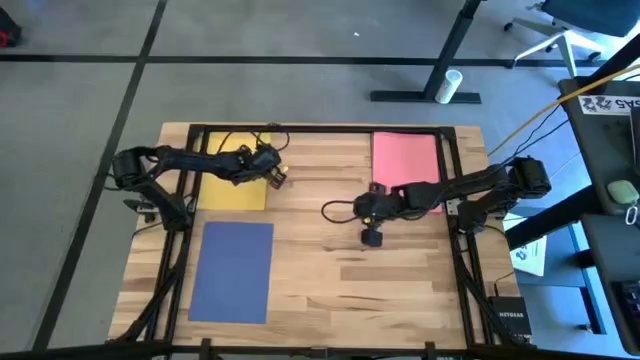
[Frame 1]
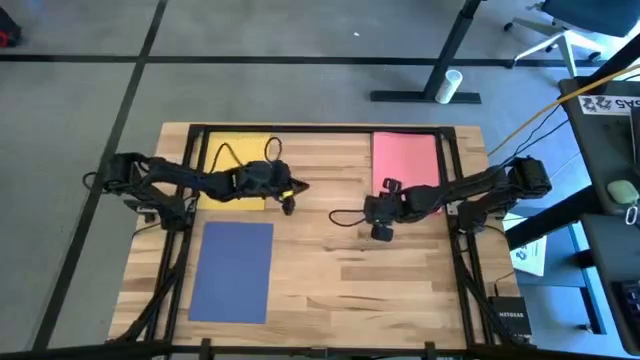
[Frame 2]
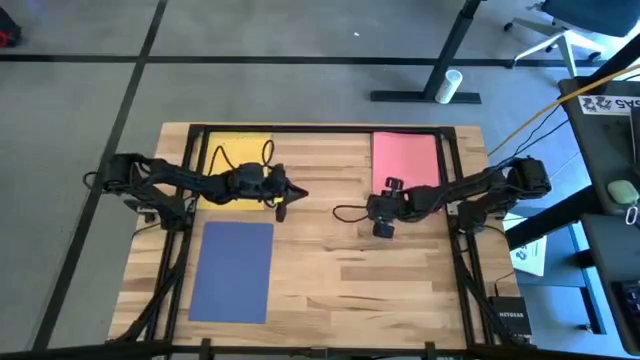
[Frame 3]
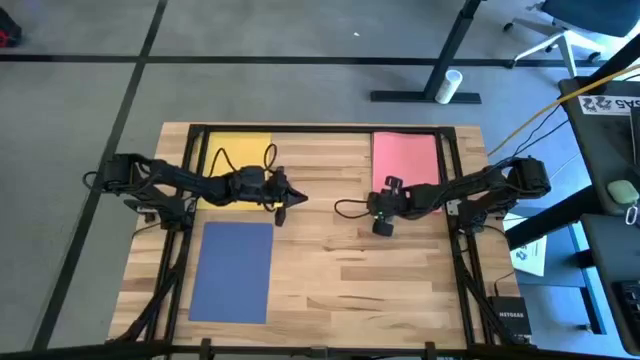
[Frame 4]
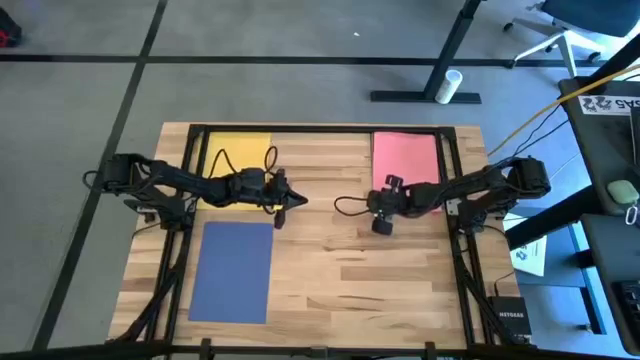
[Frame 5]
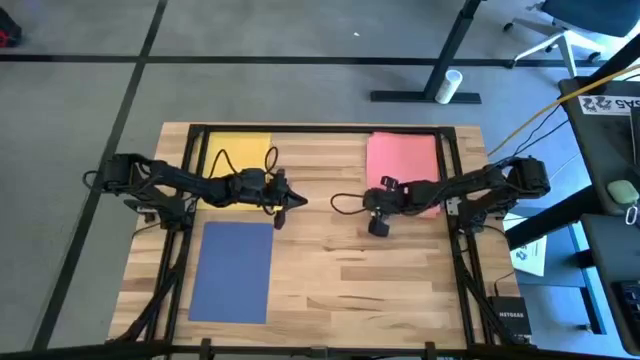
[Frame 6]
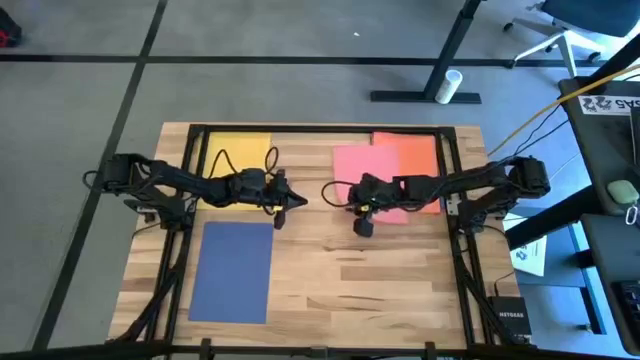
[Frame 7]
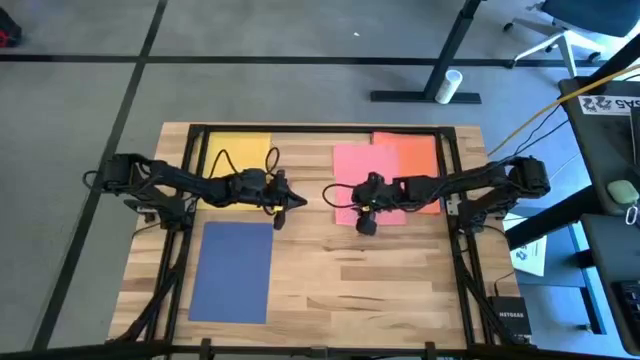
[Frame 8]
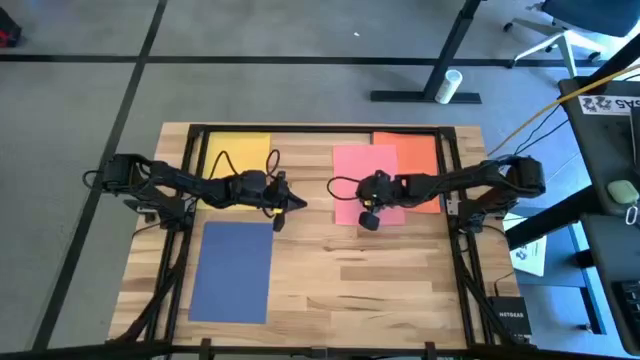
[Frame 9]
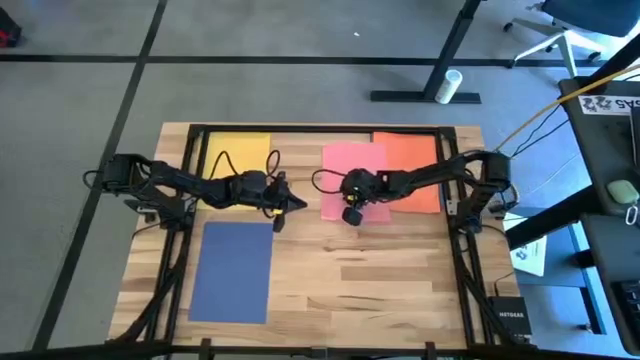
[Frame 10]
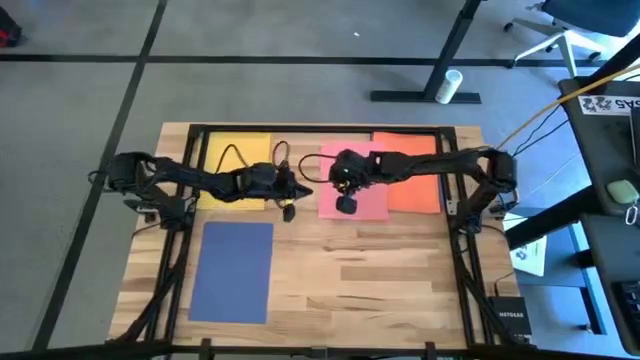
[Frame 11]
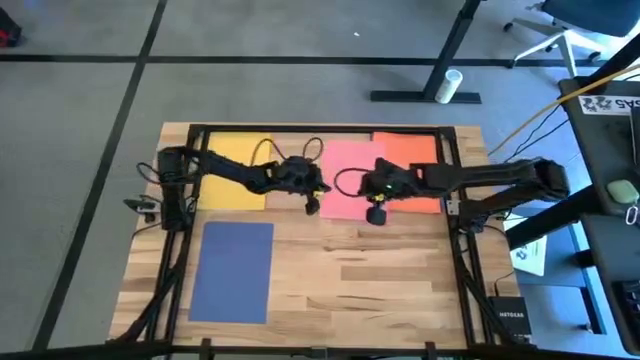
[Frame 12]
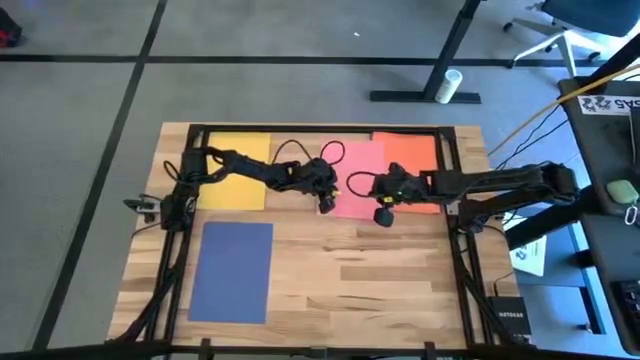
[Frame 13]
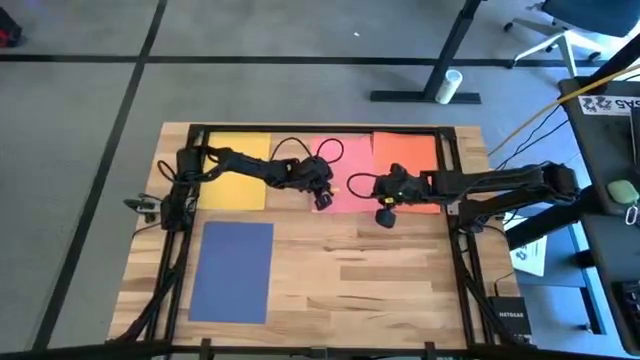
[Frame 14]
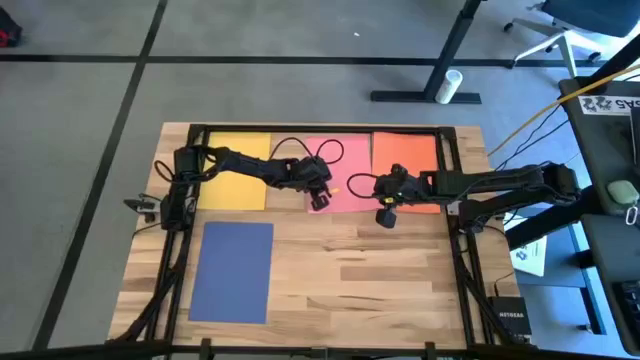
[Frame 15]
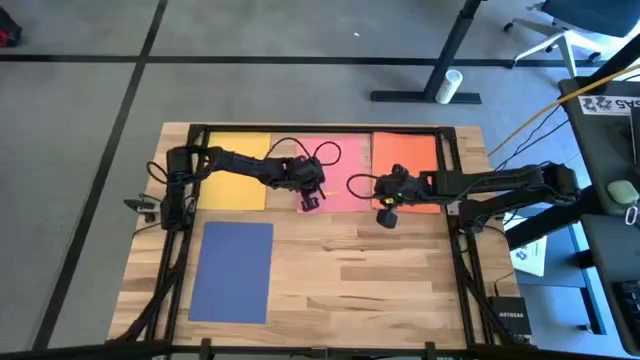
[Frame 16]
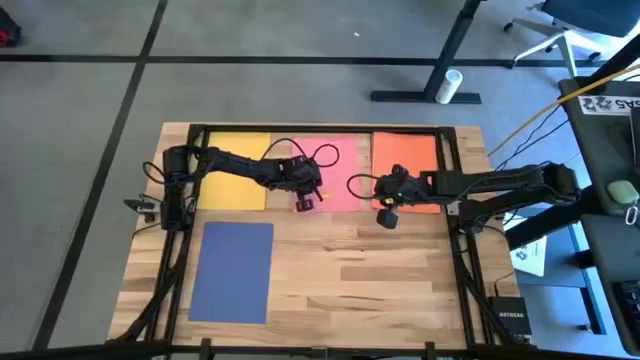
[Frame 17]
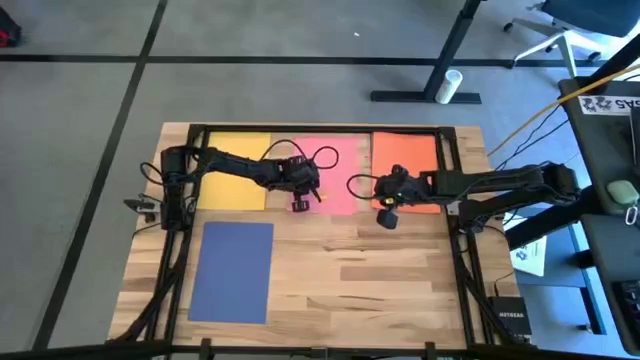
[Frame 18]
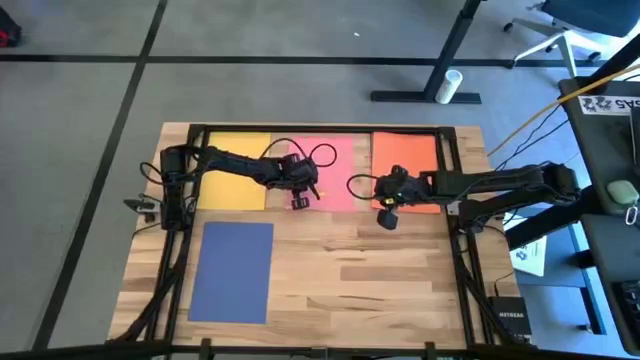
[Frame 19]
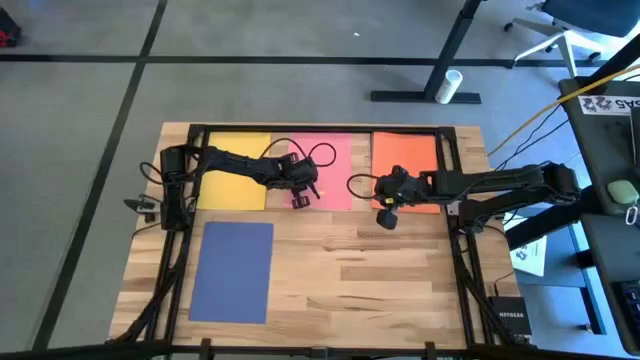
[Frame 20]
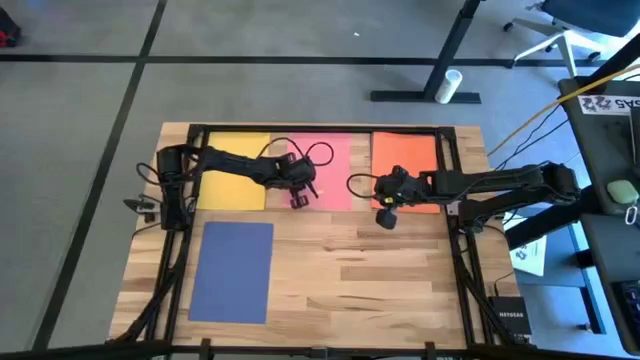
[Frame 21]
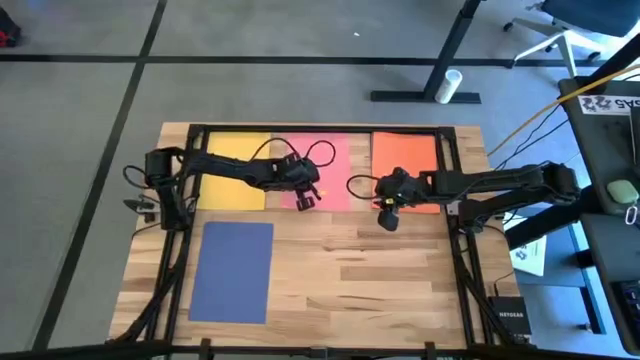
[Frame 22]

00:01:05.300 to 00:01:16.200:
Task: Organize paper
Move the pink paper to the top center of the table

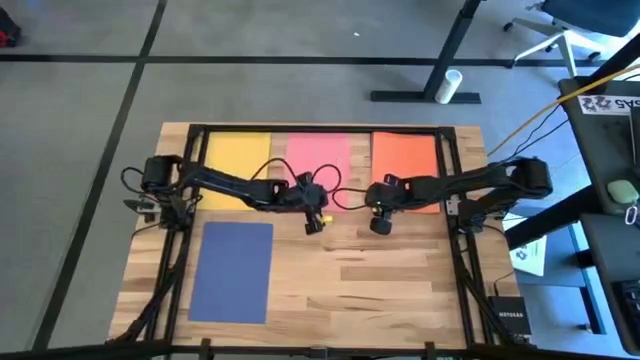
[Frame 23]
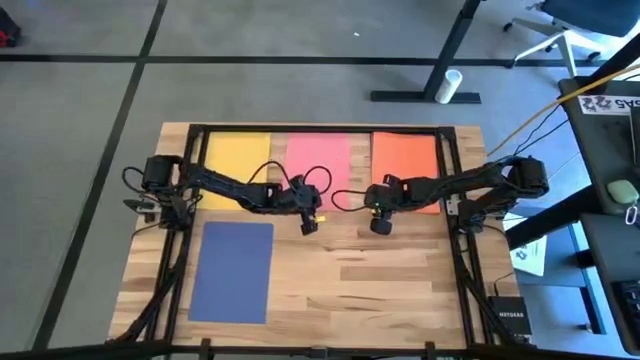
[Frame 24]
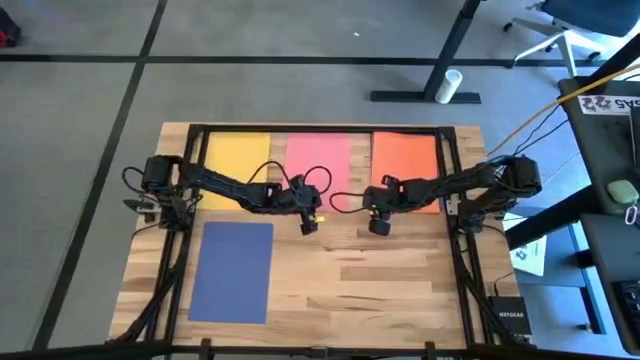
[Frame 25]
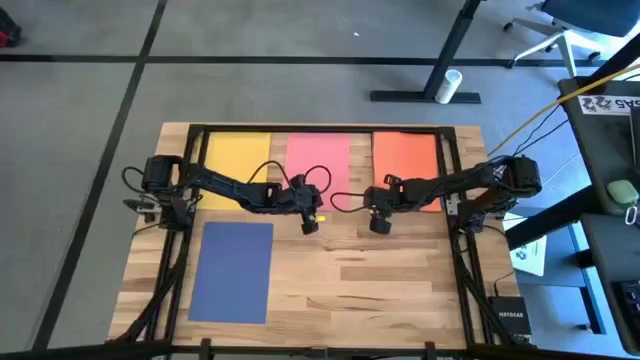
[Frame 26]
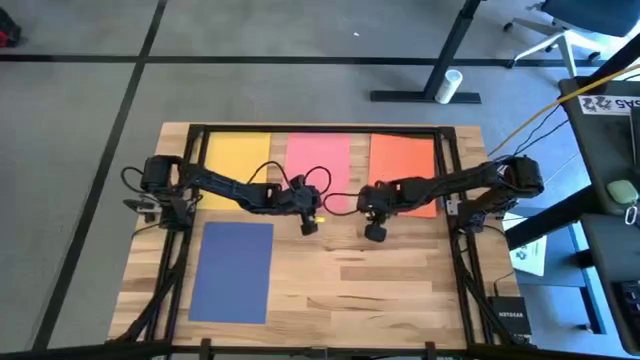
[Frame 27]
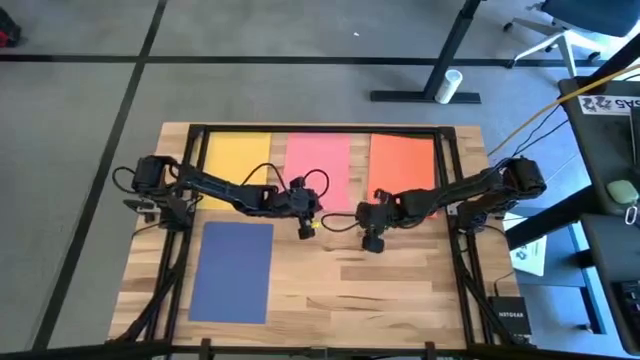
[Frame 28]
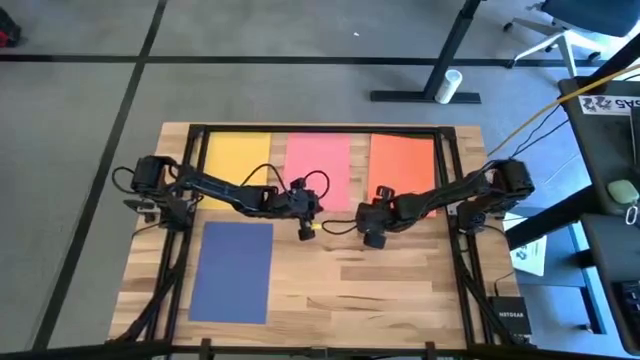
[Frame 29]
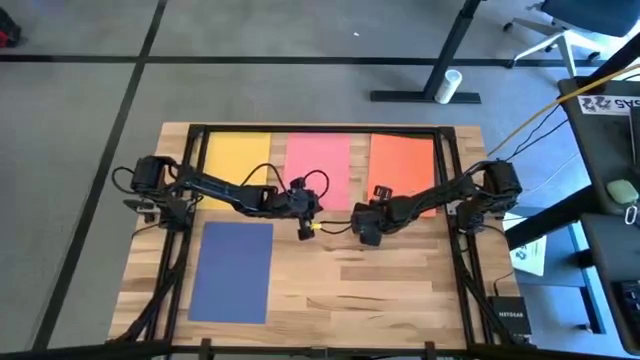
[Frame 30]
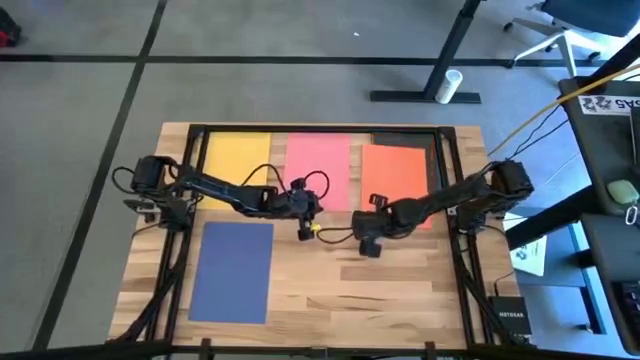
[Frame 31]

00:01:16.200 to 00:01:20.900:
Move the orange paper to the bottom center of the table

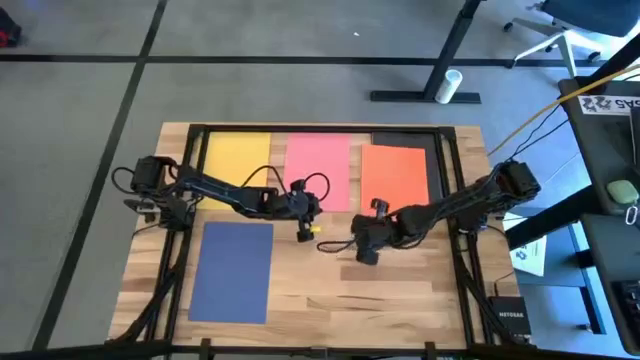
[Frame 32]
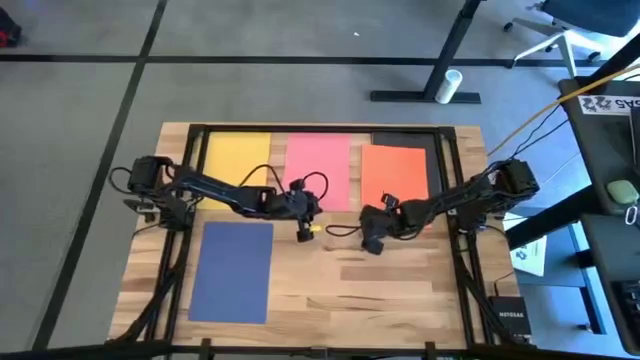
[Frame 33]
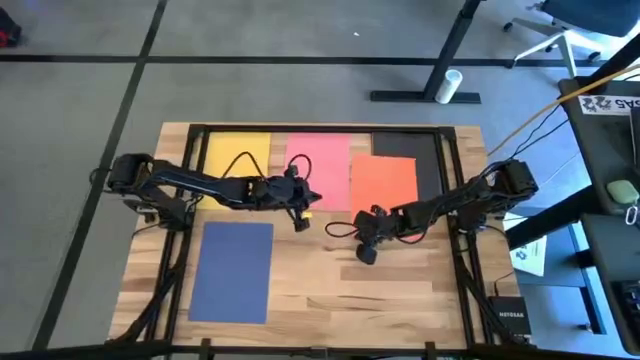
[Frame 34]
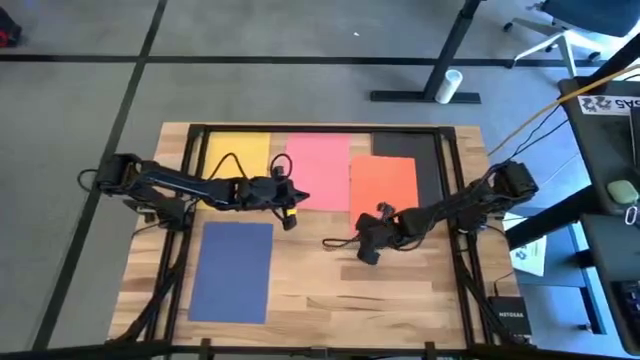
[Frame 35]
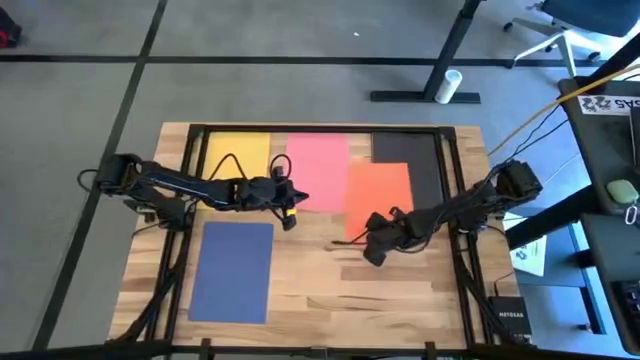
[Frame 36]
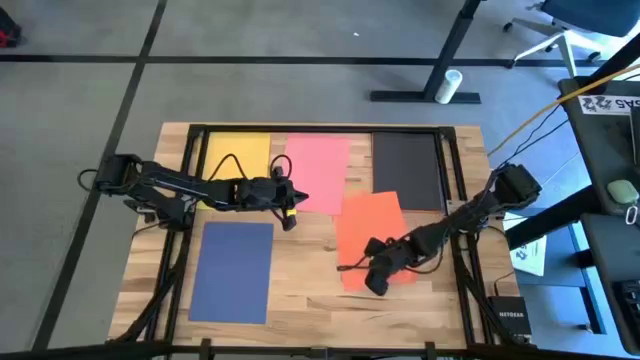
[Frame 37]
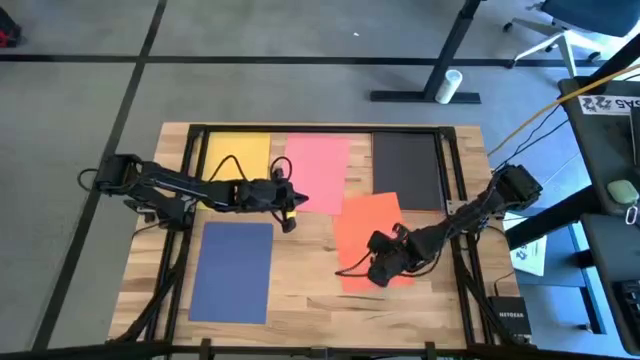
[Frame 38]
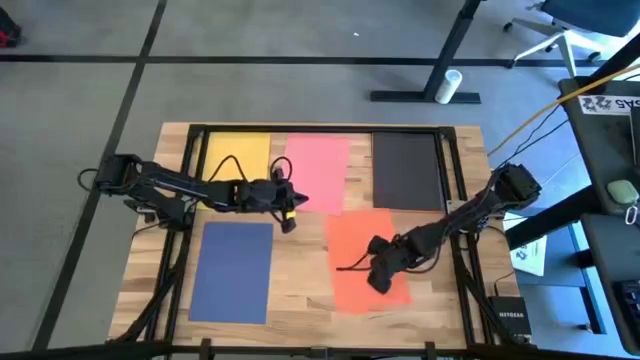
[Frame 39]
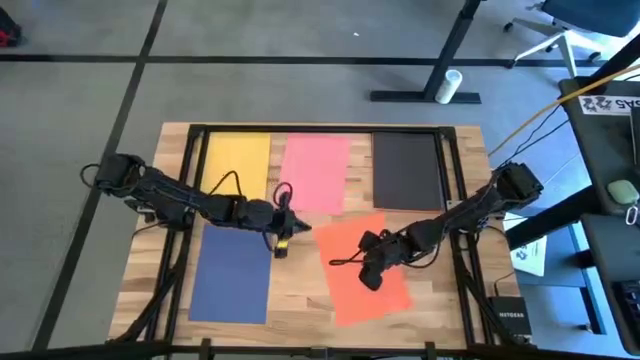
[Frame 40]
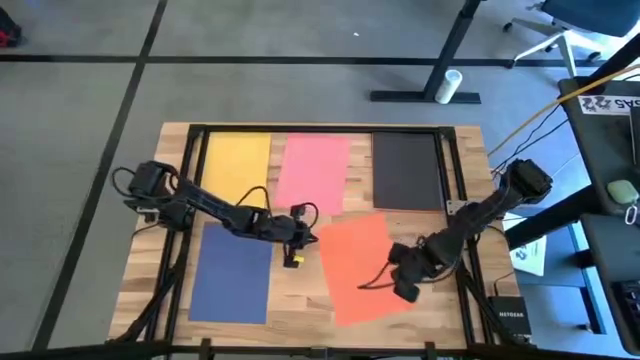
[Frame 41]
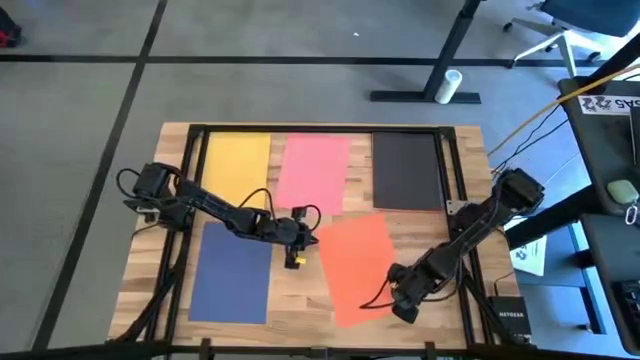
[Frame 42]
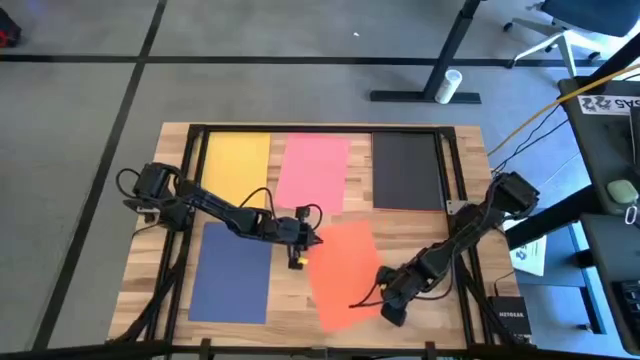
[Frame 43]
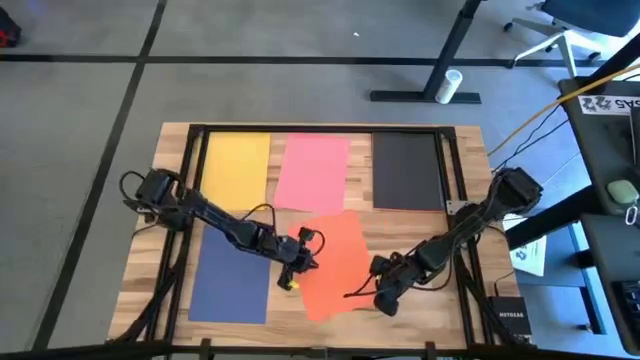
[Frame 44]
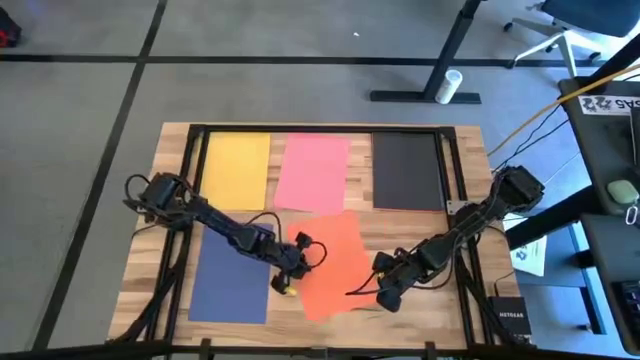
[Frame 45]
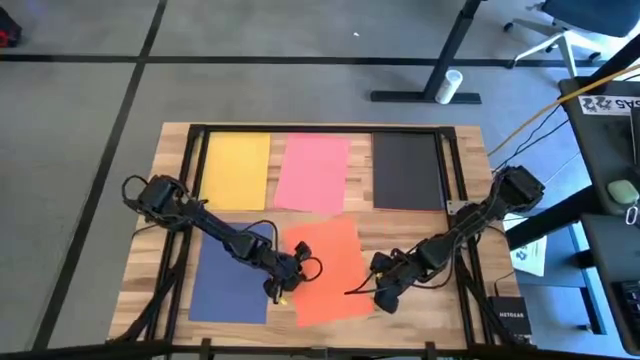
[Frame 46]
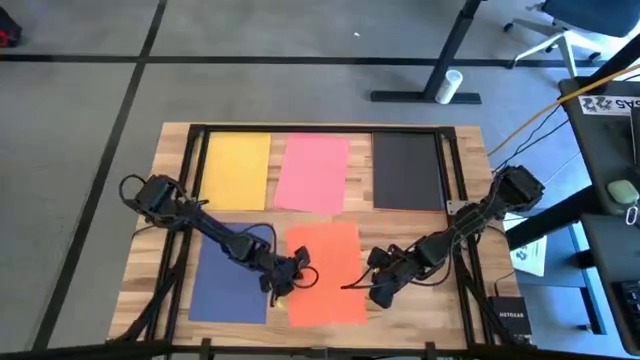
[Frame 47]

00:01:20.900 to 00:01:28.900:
Move the orange paper to the bottom center of the table
